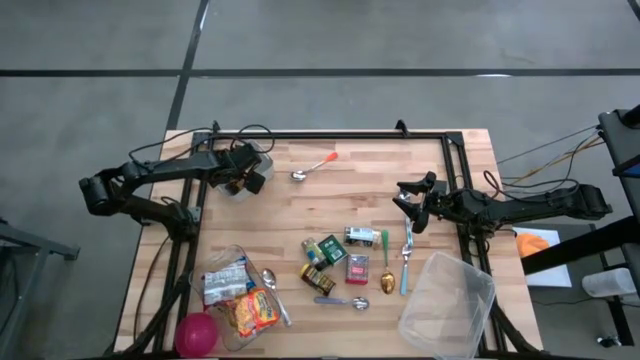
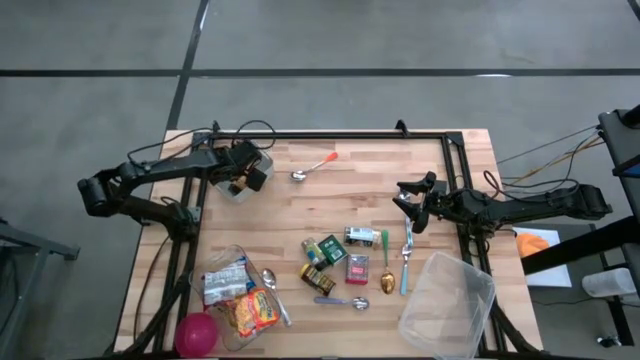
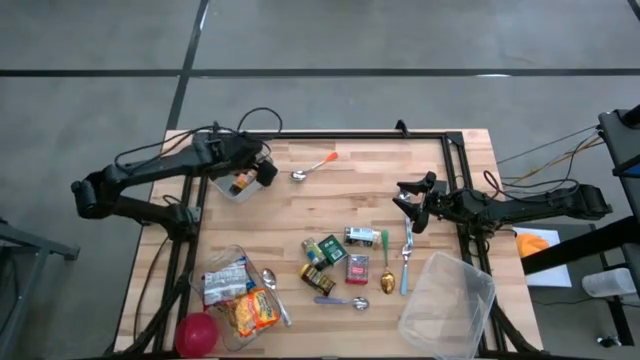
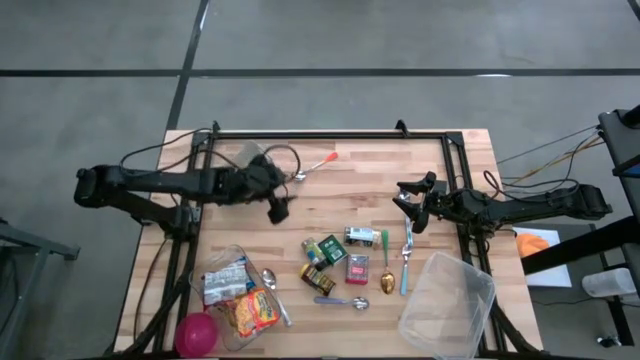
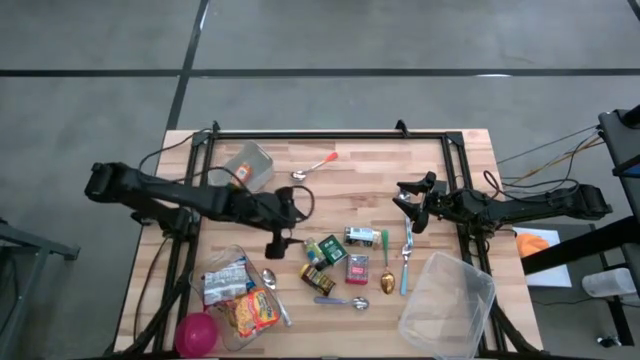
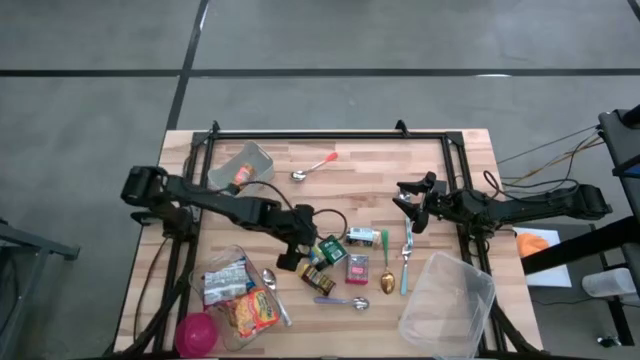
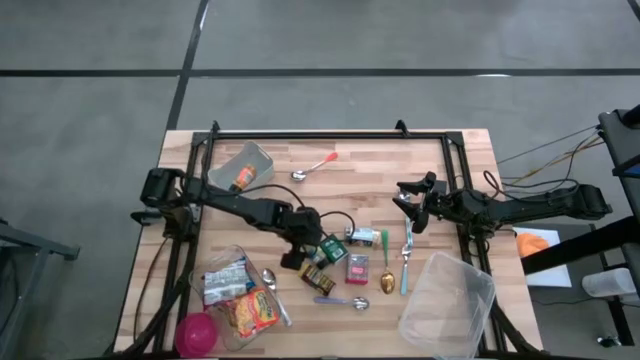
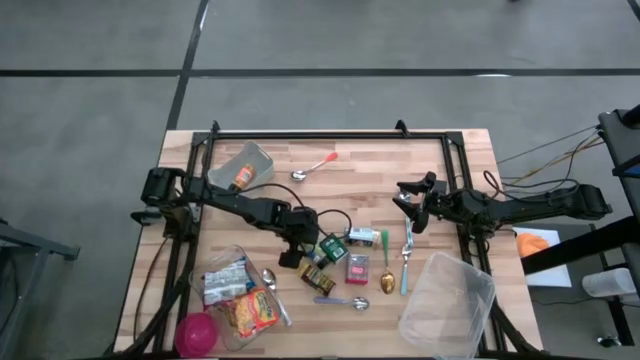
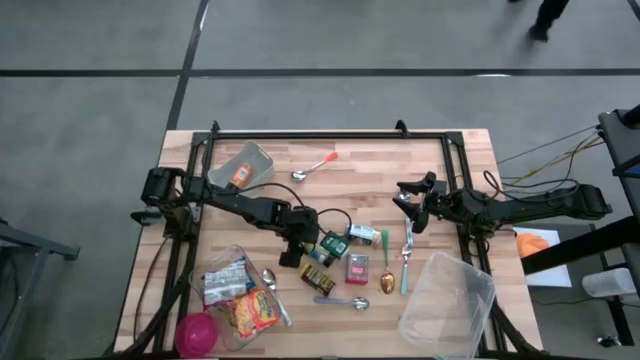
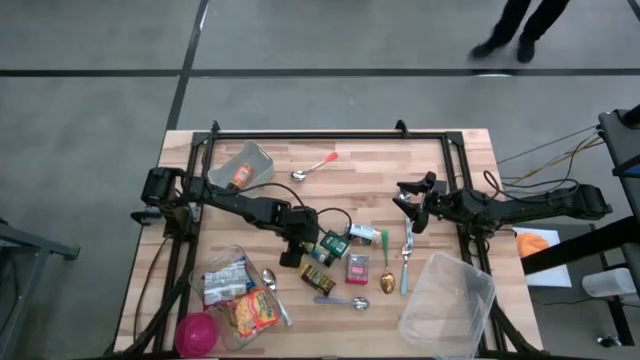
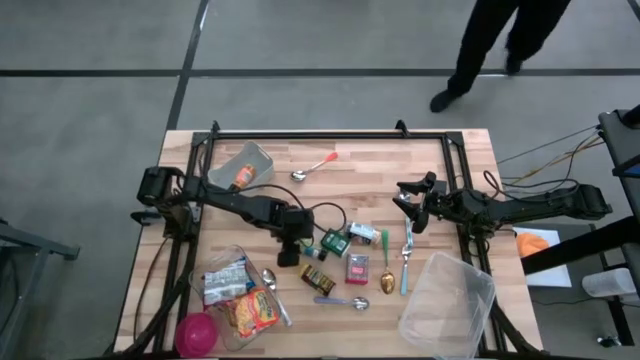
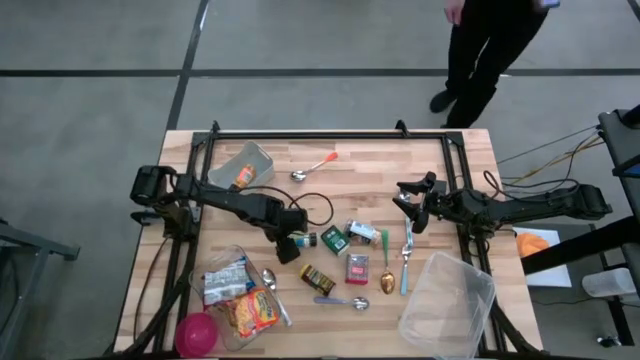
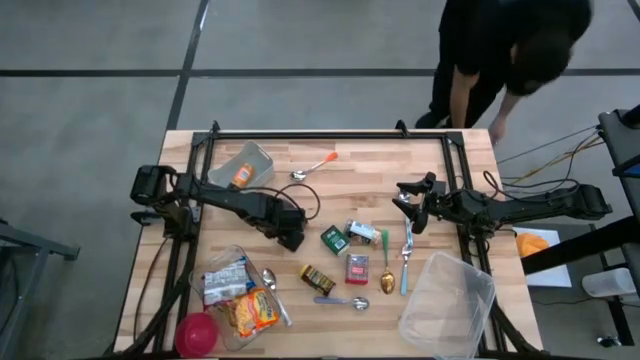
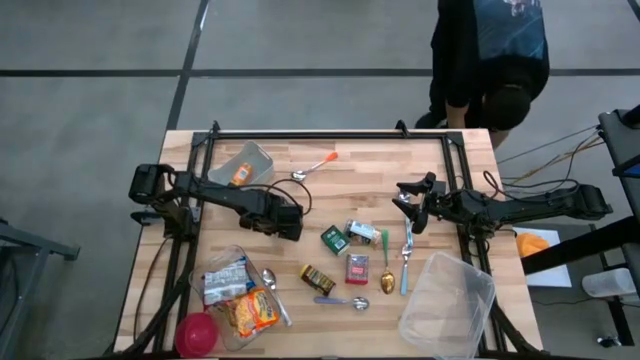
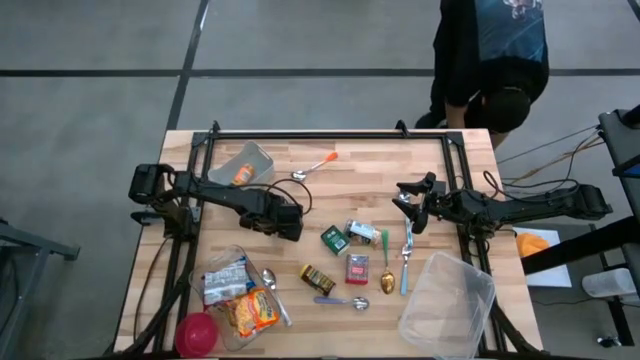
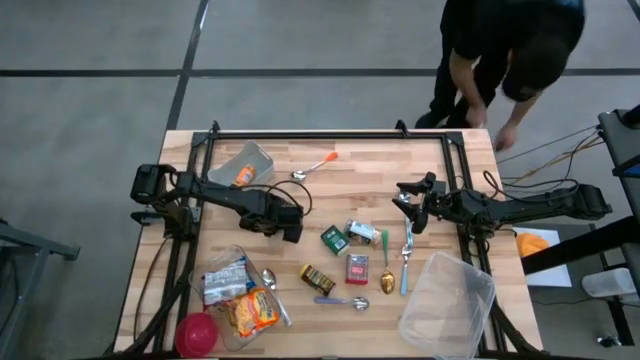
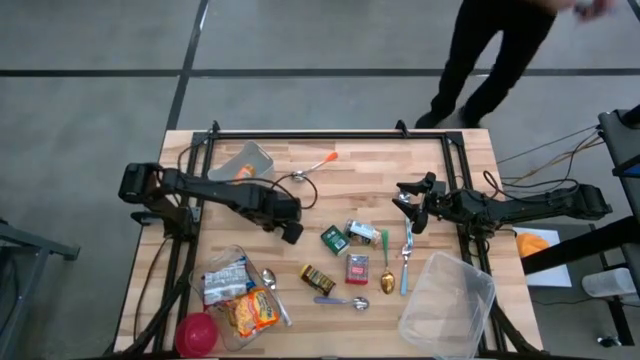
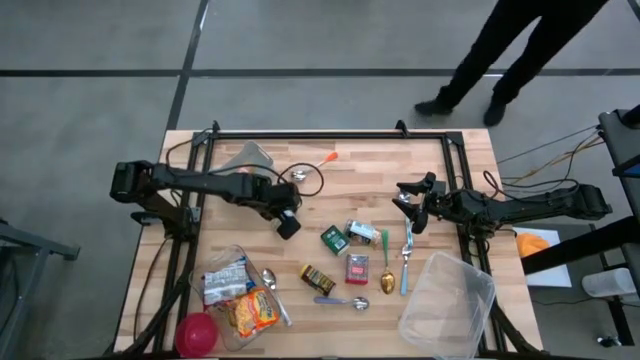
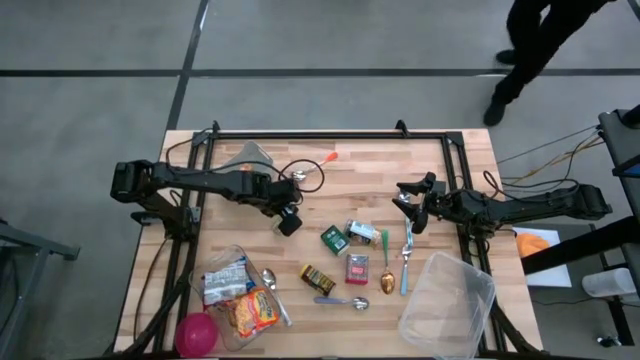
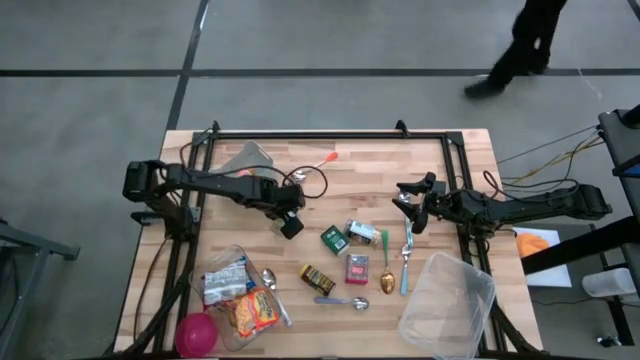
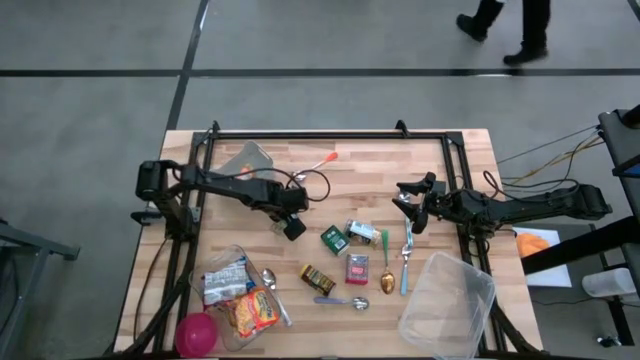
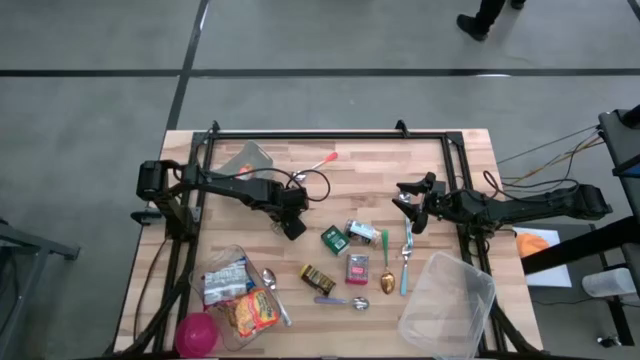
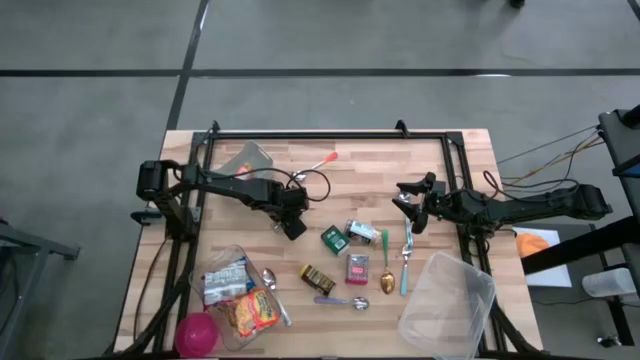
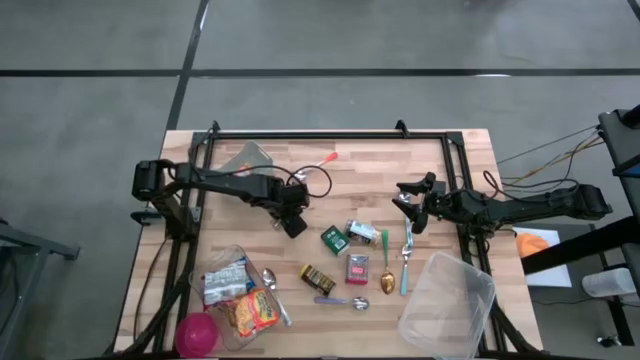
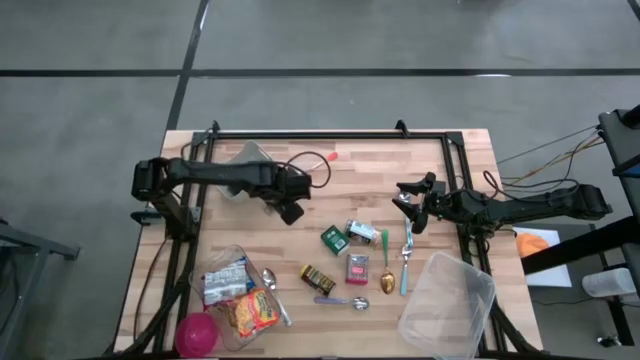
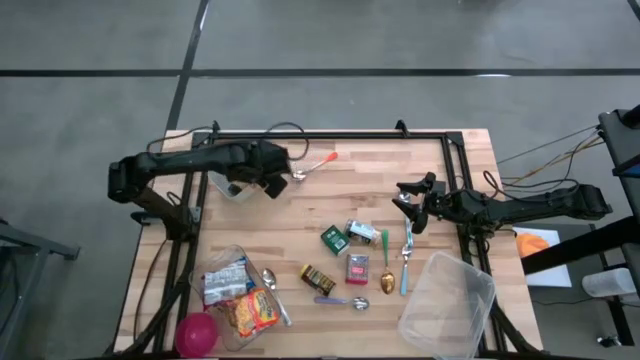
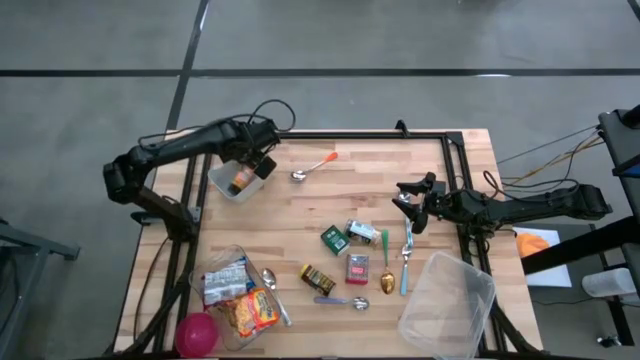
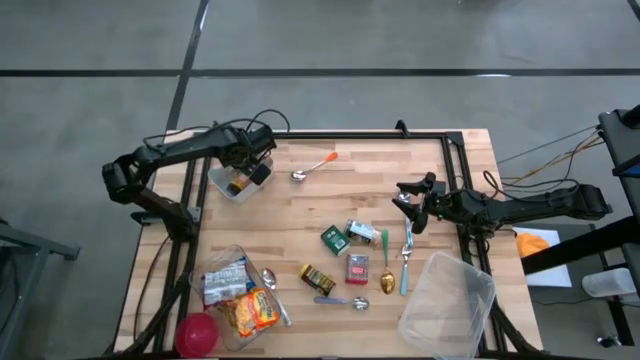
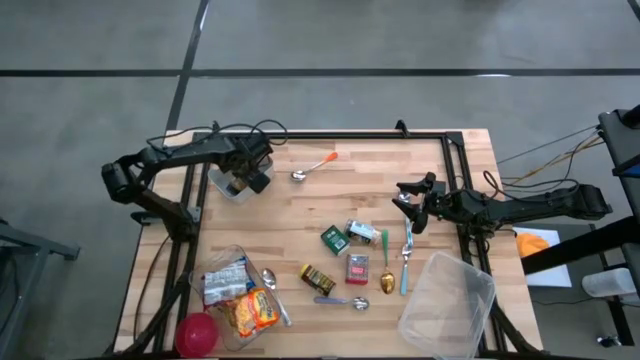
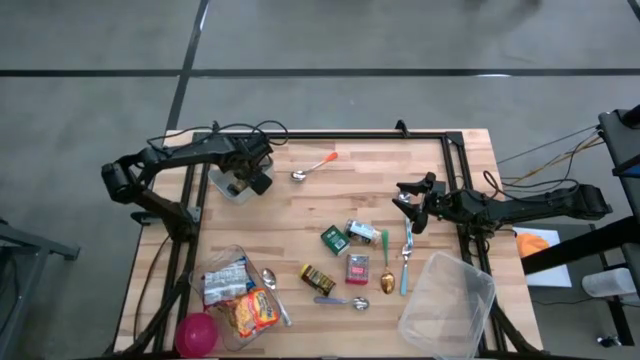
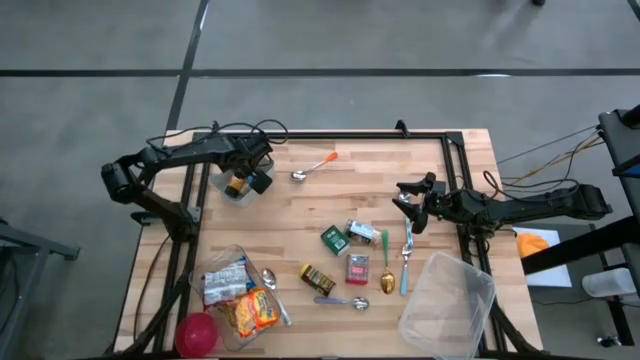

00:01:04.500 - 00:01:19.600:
Put the green seasoning bottle into the gray bin
